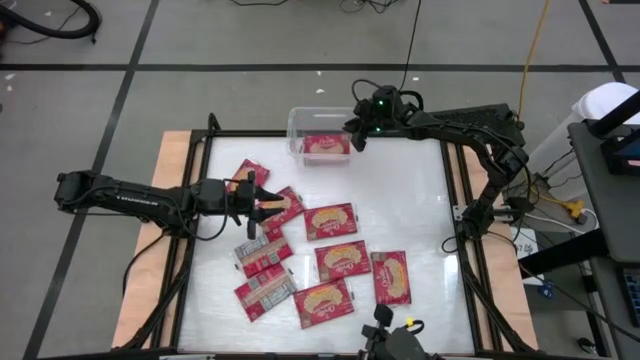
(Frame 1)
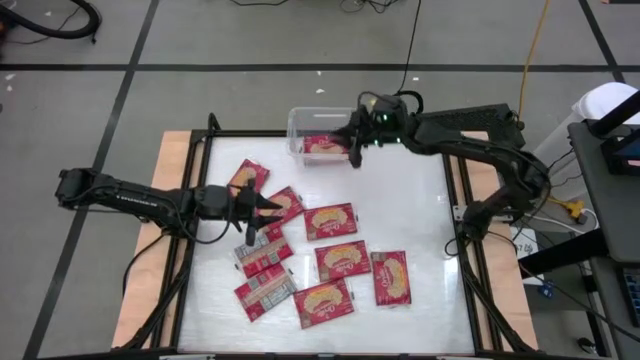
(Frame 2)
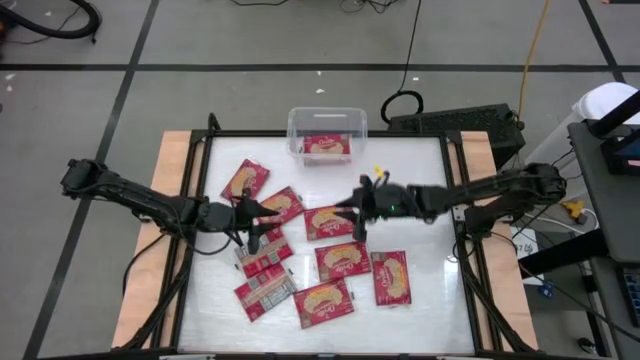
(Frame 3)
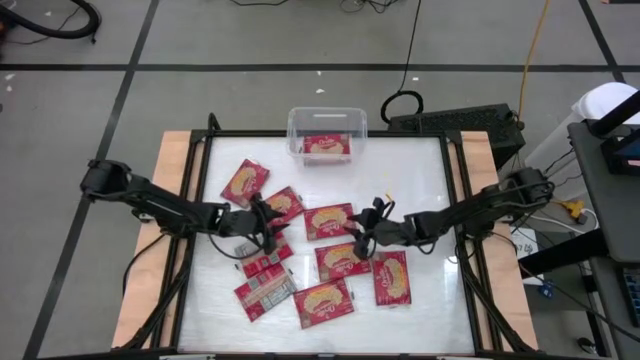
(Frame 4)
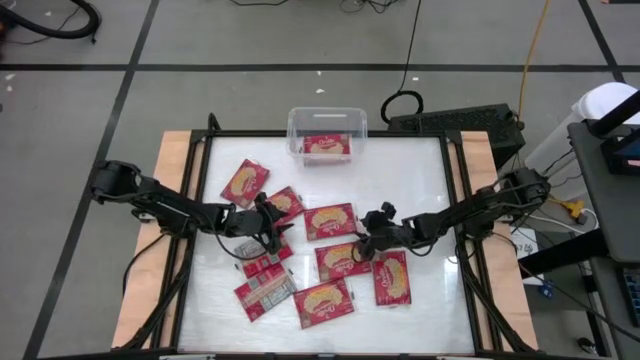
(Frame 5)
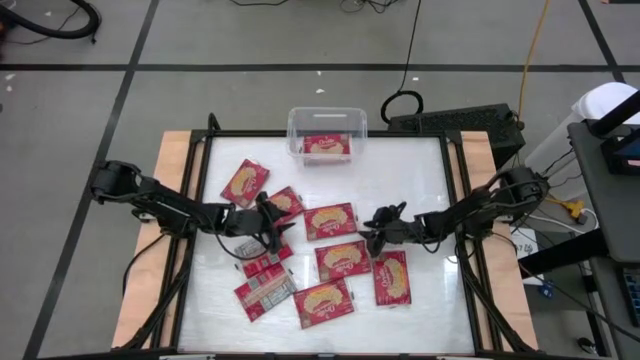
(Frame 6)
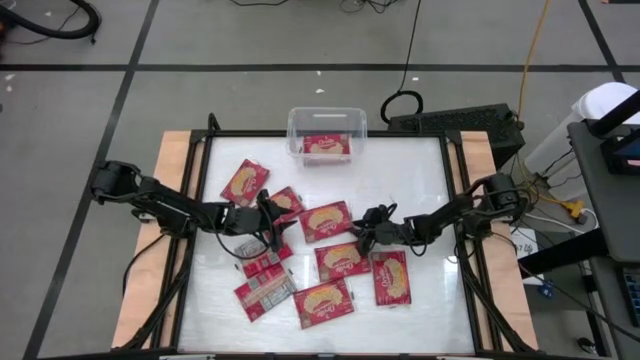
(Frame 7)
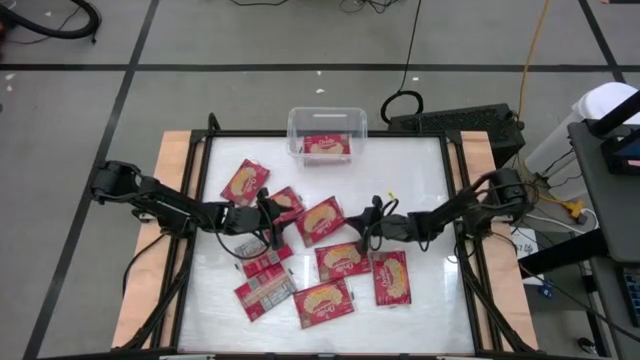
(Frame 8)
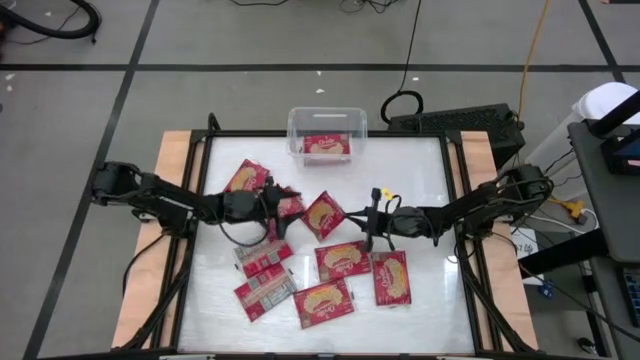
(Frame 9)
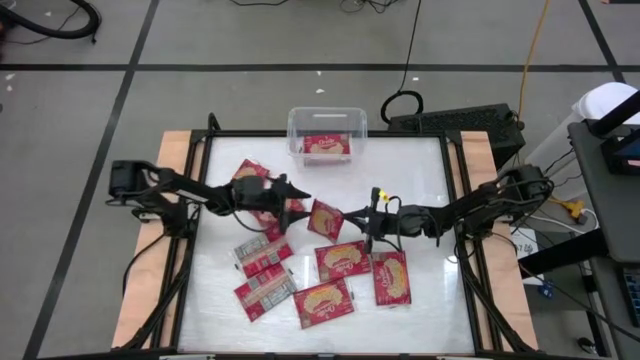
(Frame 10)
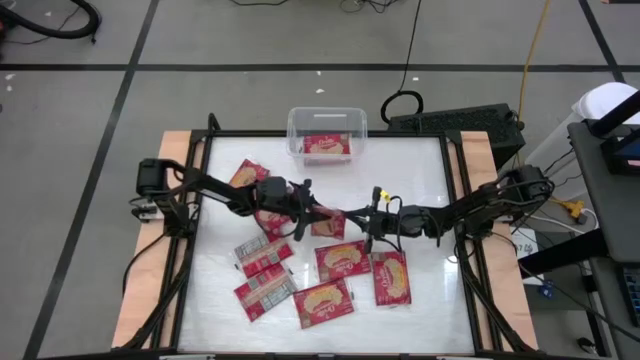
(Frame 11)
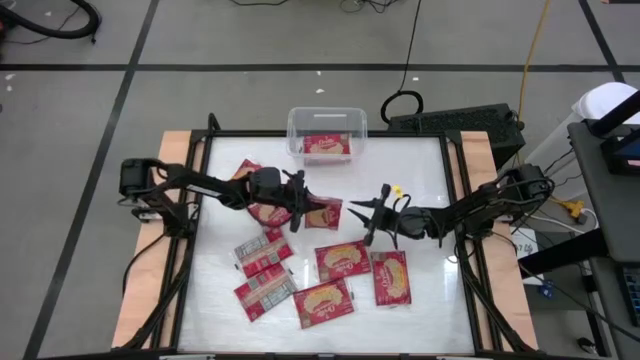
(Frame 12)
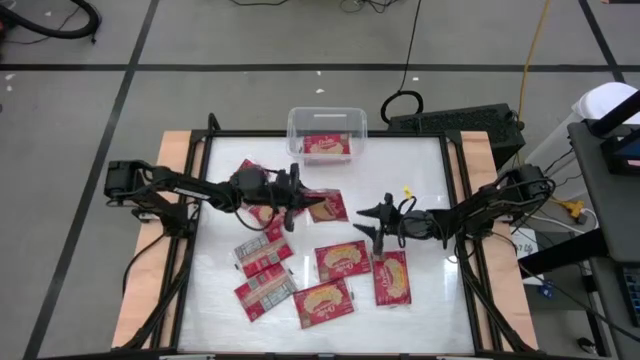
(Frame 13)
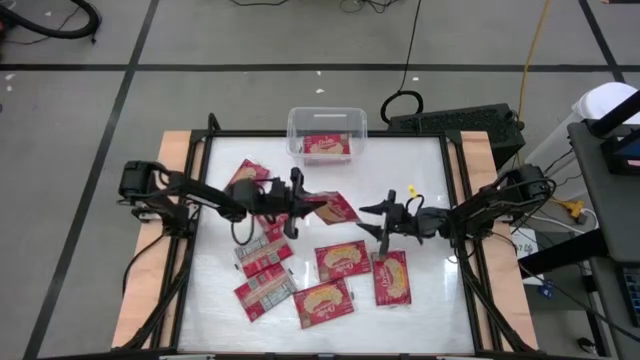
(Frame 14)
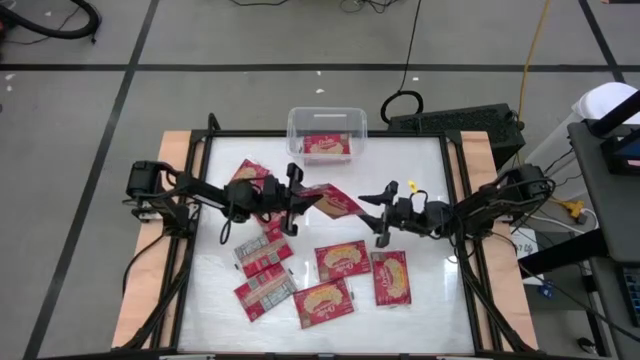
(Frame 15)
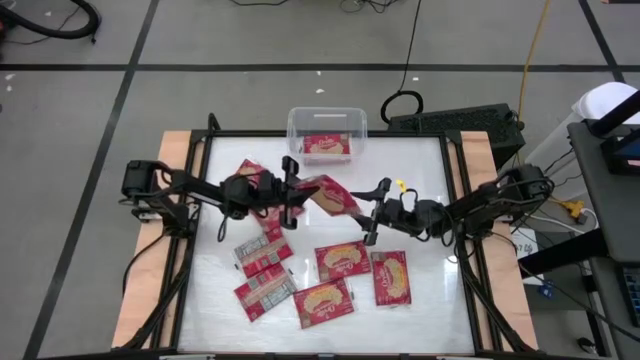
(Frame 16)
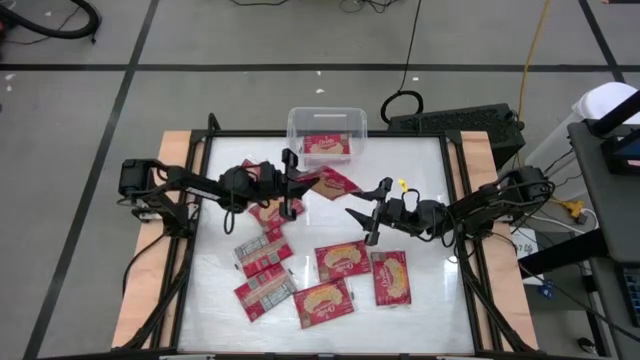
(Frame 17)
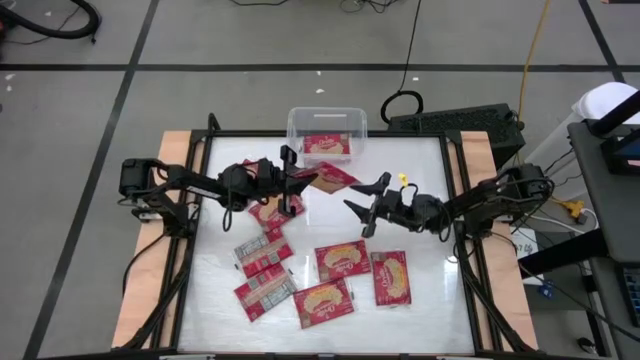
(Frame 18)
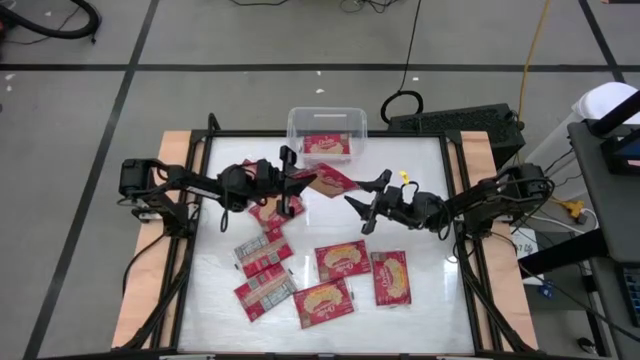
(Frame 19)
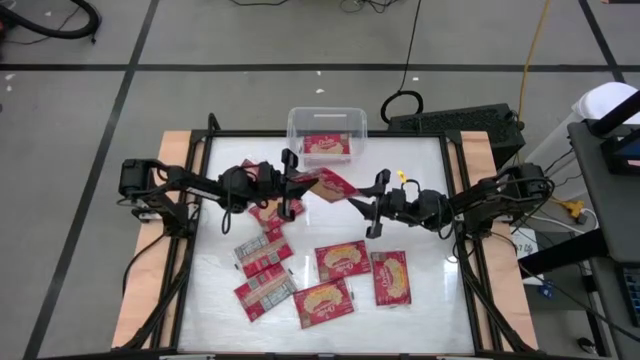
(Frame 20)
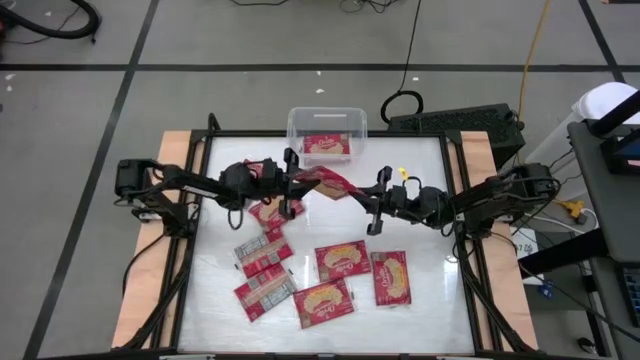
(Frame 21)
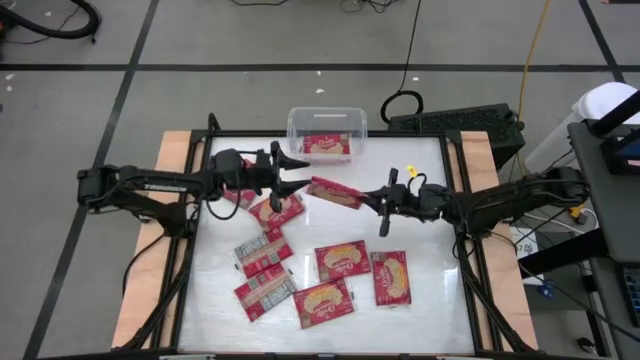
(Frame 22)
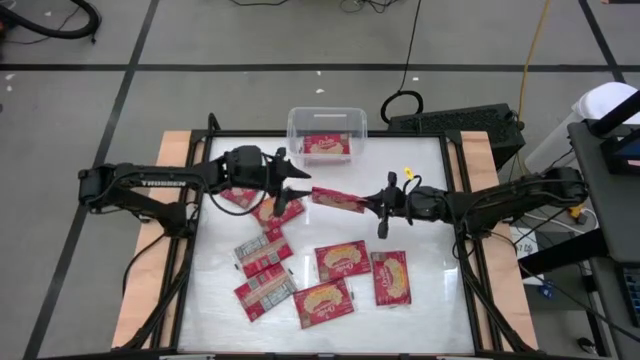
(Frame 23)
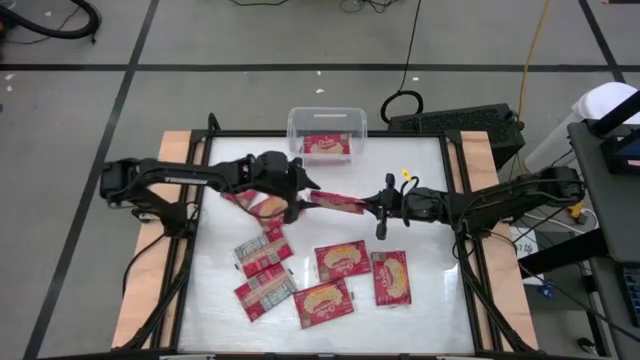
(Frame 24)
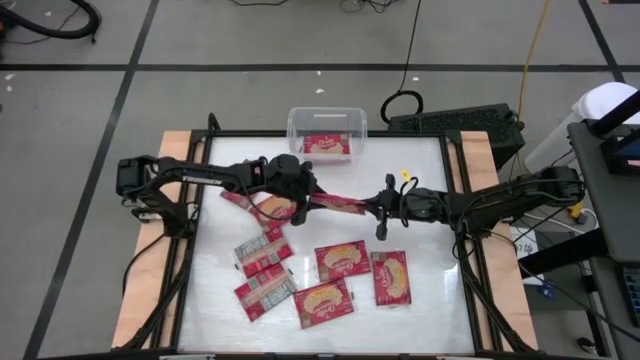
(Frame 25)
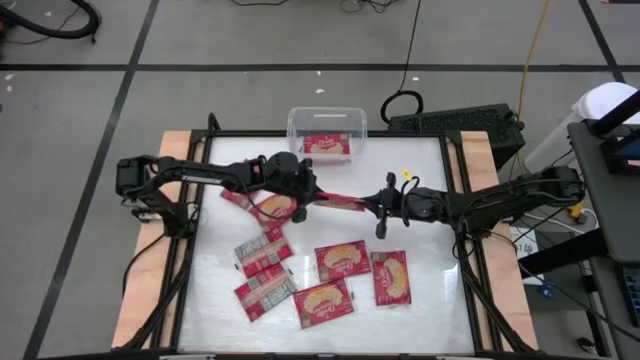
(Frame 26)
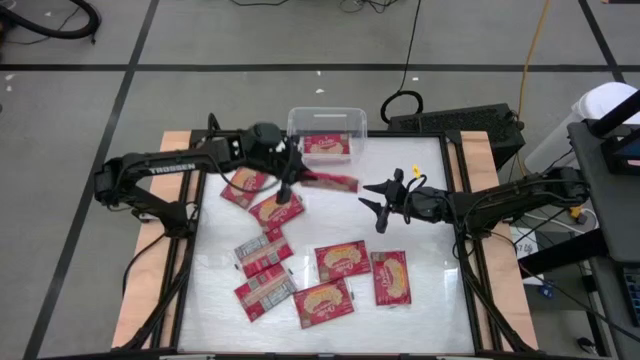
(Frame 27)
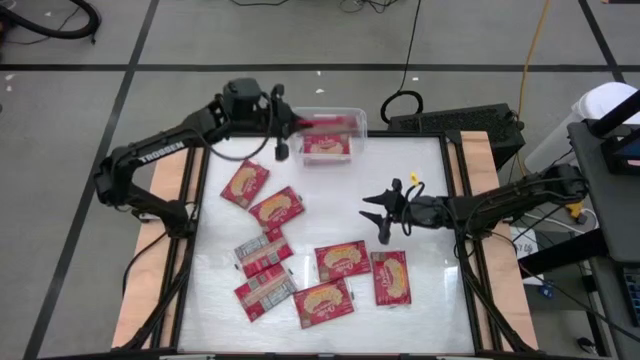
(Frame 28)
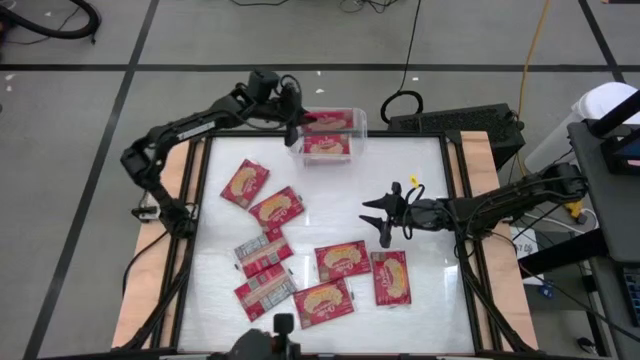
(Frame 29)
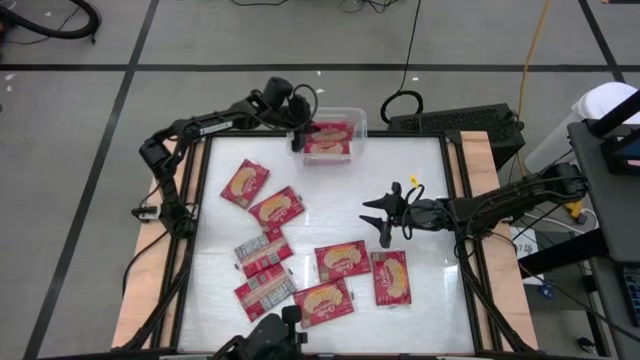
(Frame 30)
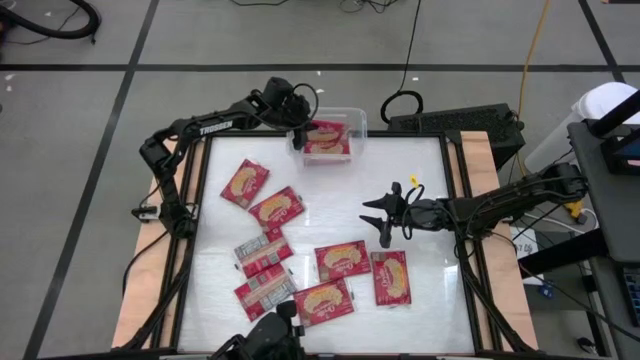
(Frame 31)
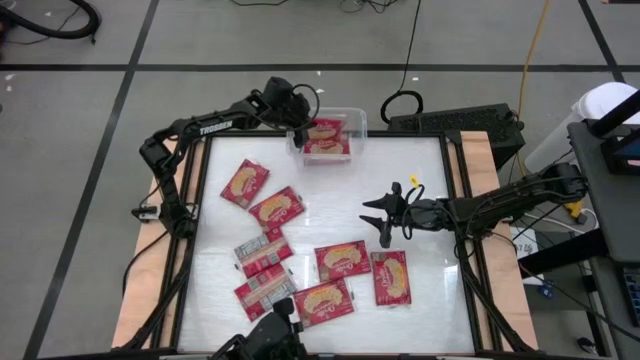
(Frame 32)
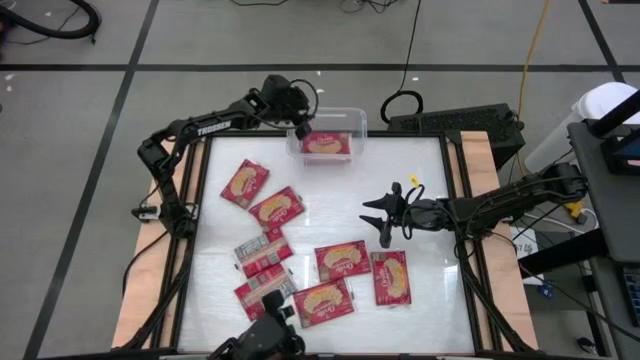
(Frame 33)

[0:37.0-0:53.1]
Task: Sort popcorn bags into baskets
Put the popcorn bag into the transparent bin

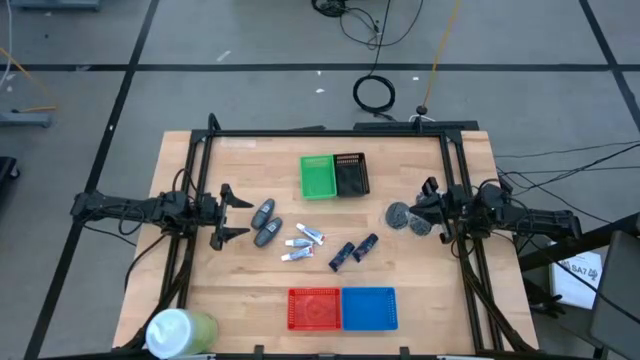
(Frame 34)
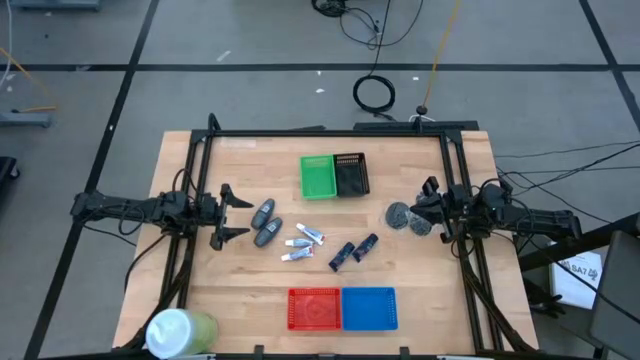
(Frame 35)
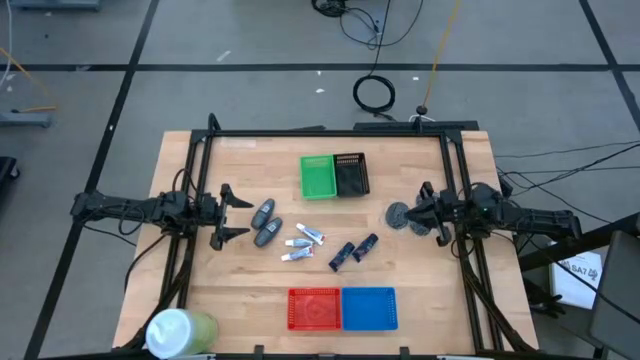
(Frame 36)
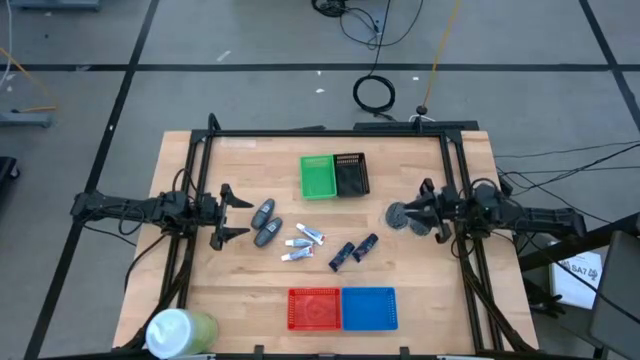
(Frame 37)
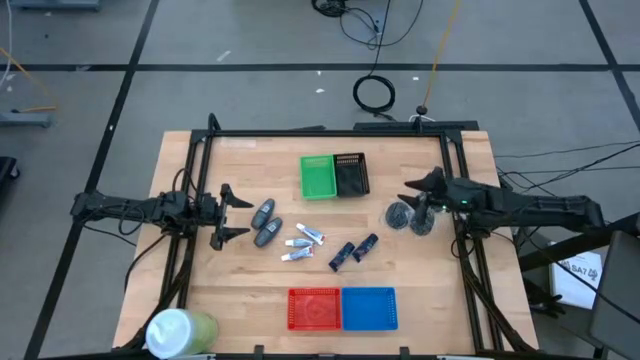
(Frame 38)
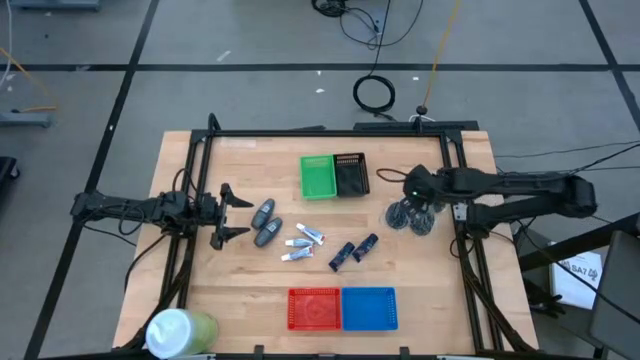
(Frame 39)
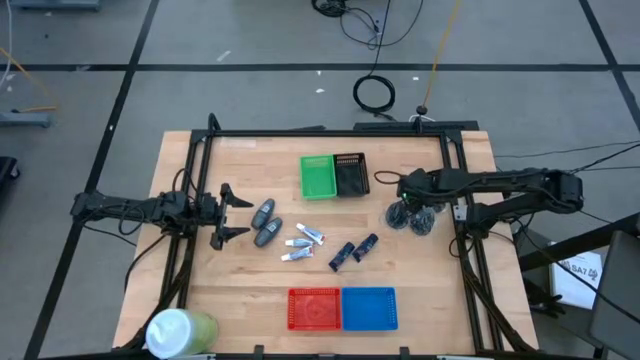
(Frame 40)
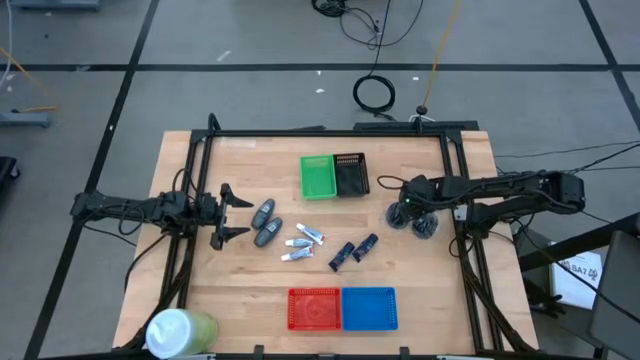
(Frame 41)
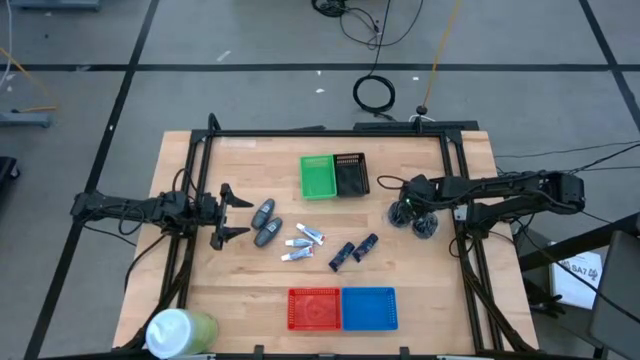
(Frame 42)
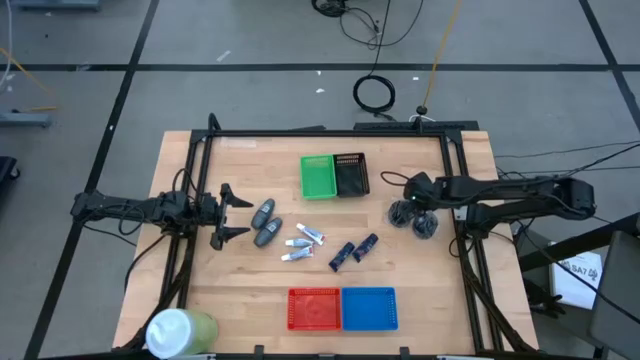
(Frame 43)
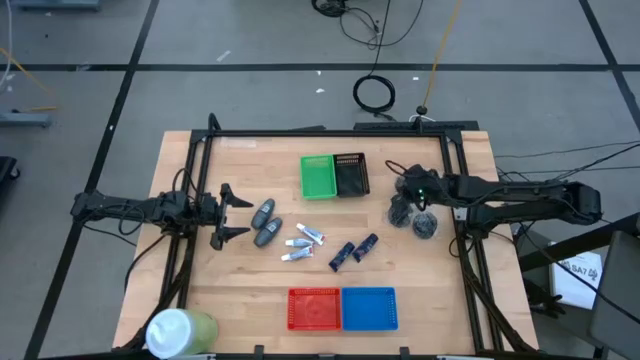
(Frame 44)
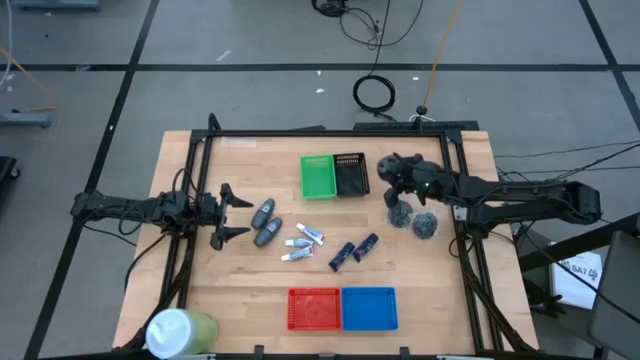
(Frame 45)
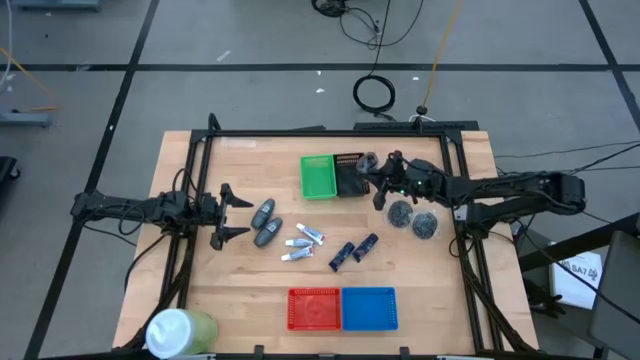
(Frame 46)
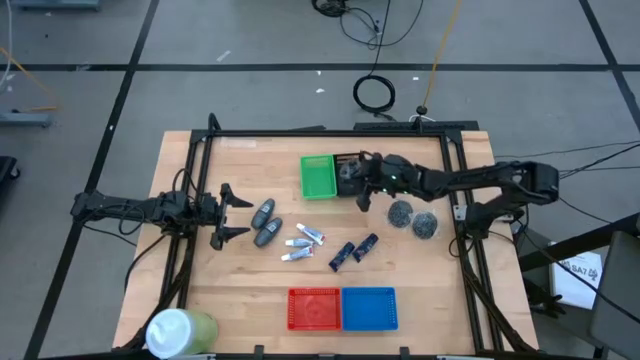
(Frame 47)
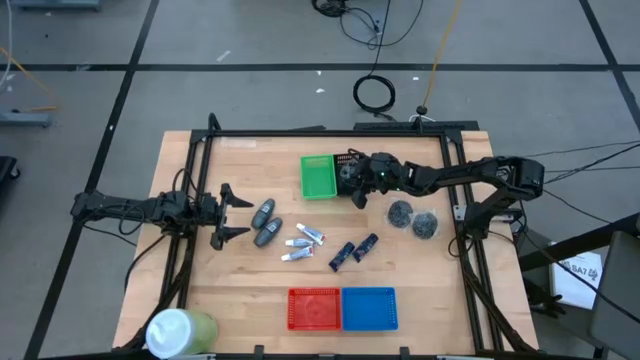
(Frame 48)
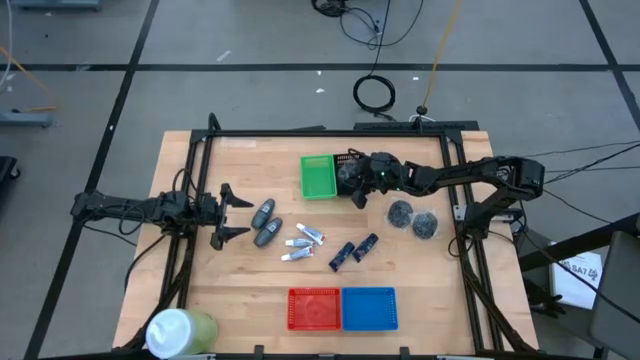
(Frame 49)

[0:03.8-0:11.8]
Task: Pick & Place Travel size toiletries
Put the top hairbrush into the black bin
